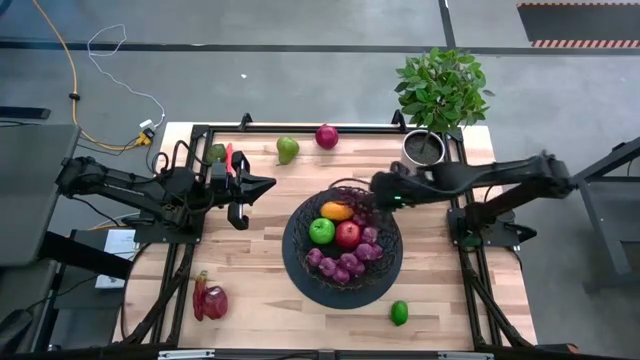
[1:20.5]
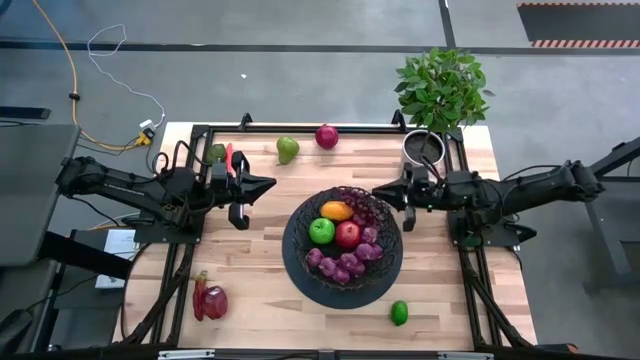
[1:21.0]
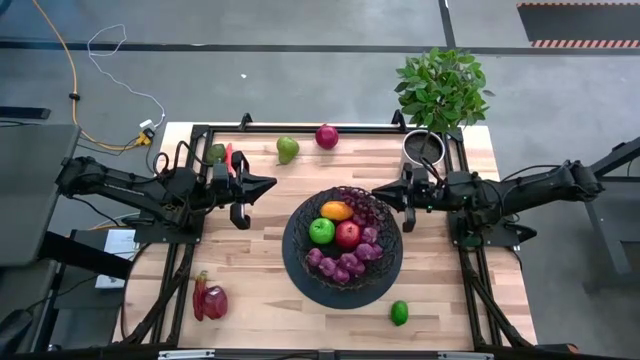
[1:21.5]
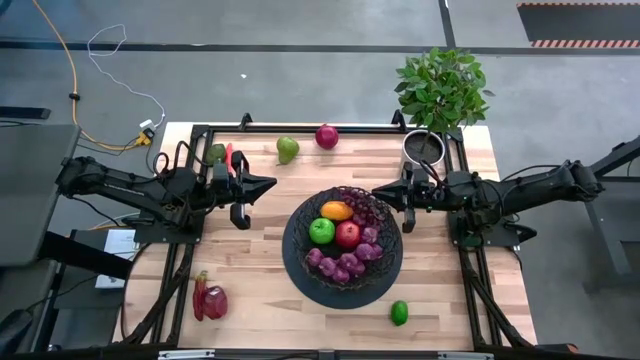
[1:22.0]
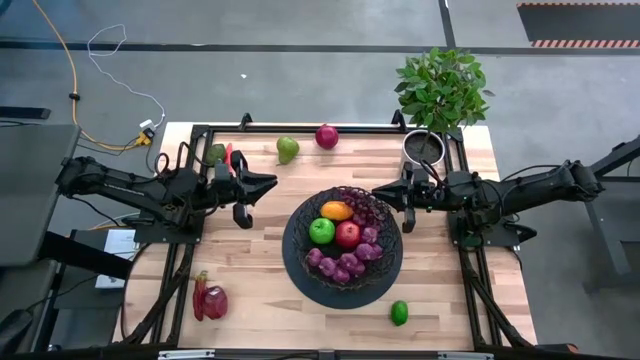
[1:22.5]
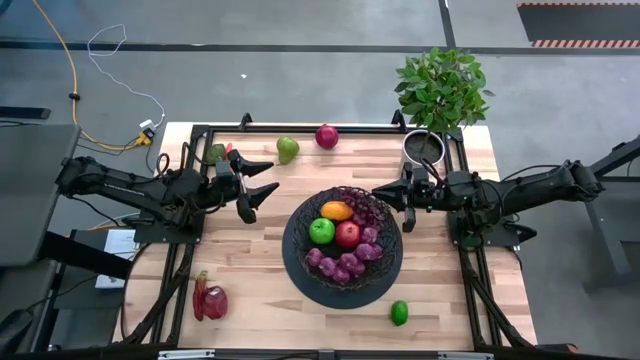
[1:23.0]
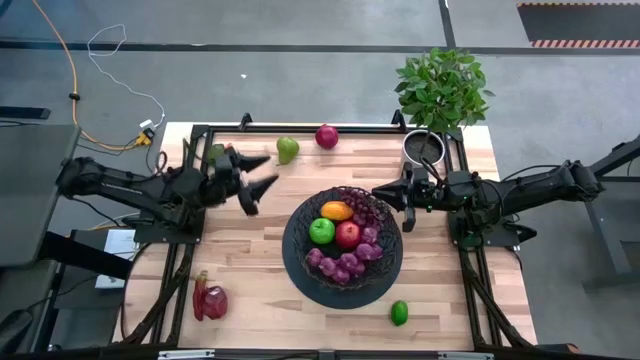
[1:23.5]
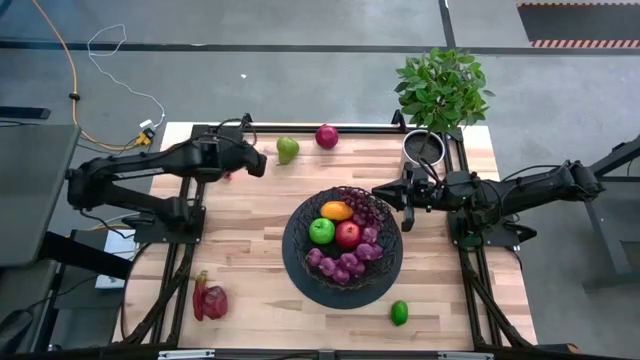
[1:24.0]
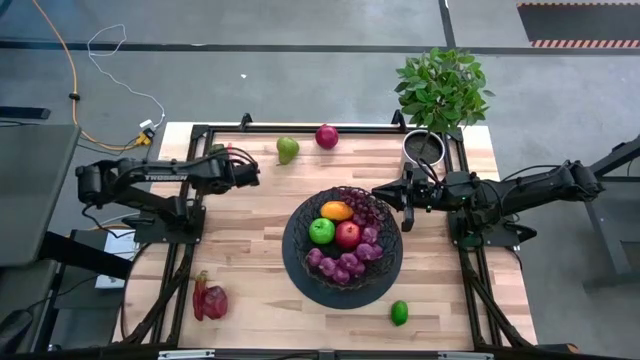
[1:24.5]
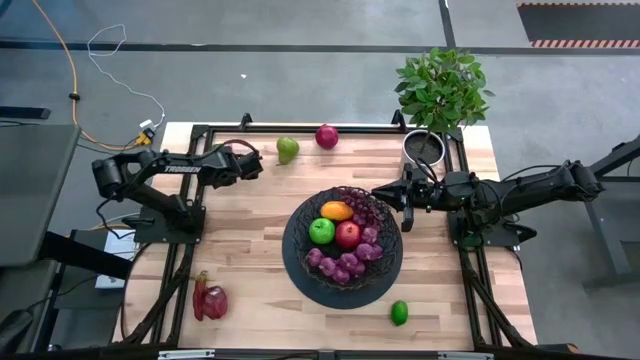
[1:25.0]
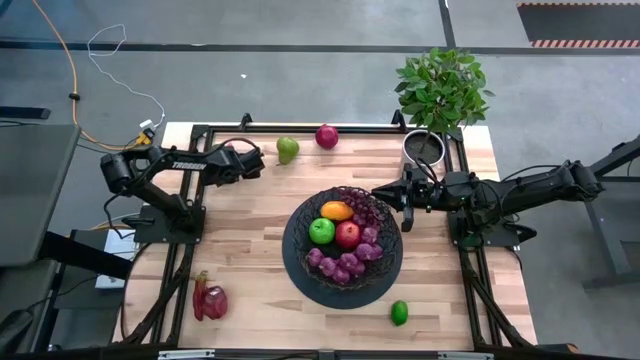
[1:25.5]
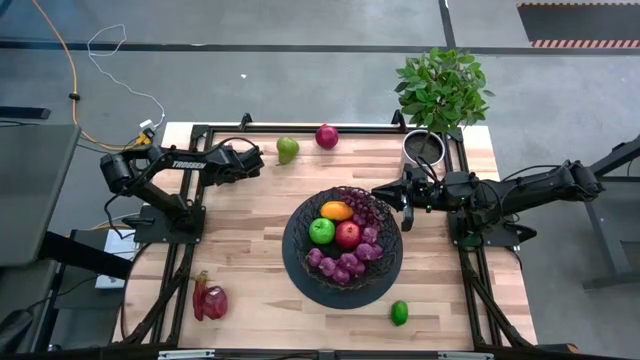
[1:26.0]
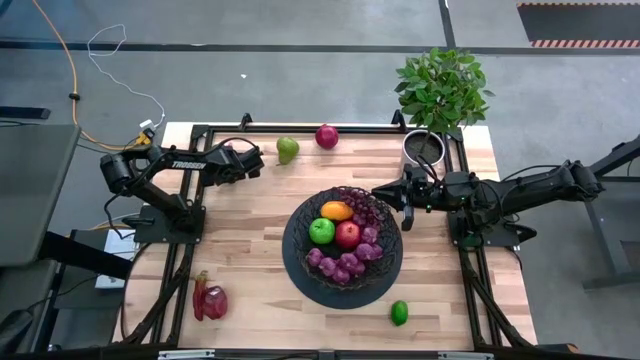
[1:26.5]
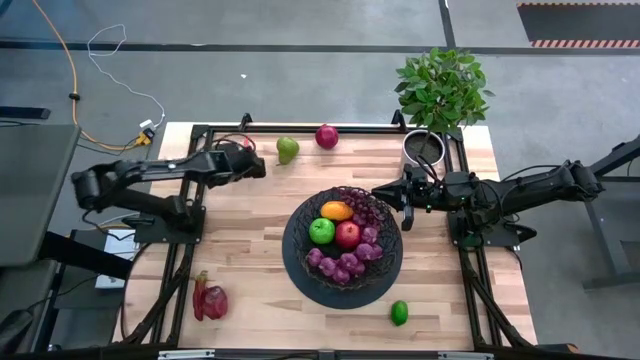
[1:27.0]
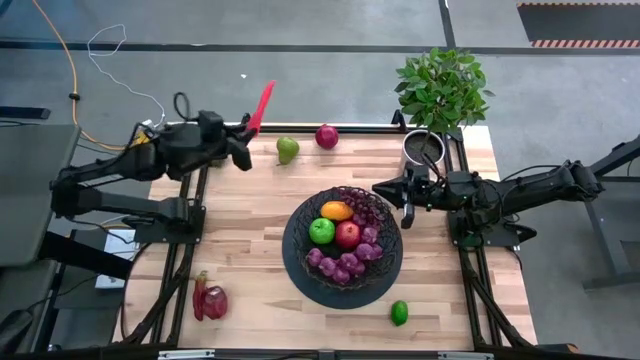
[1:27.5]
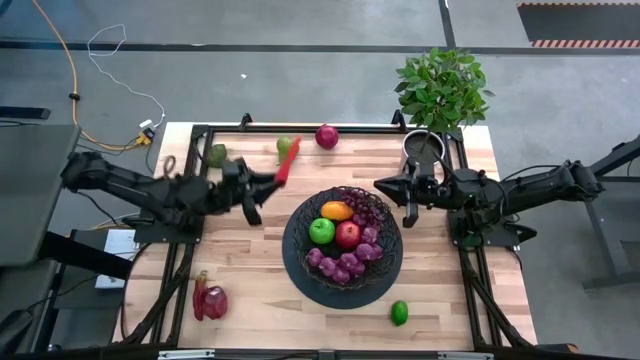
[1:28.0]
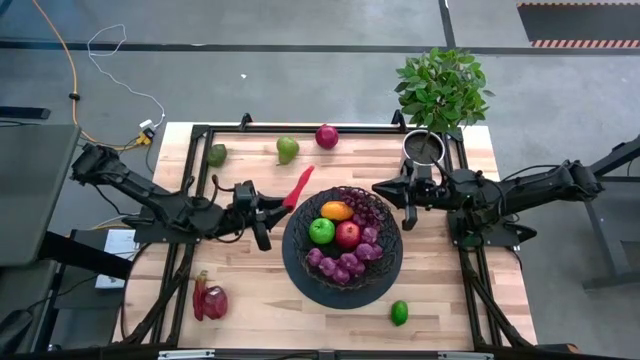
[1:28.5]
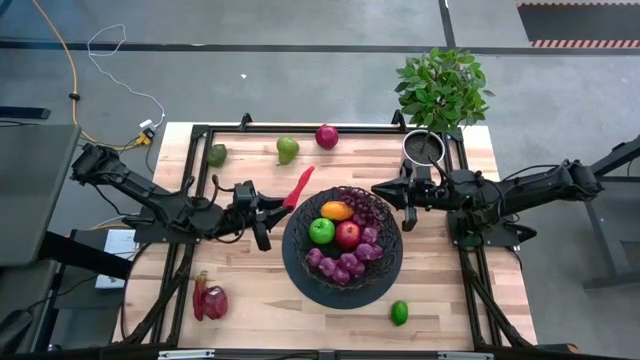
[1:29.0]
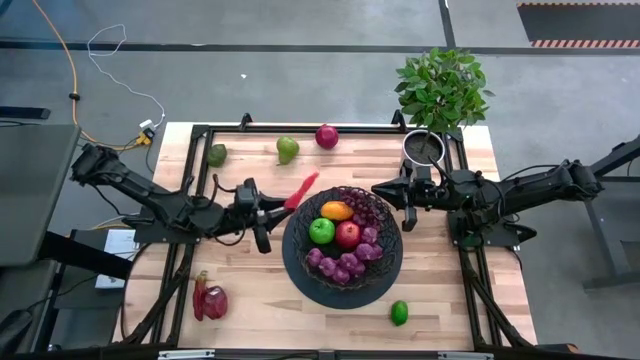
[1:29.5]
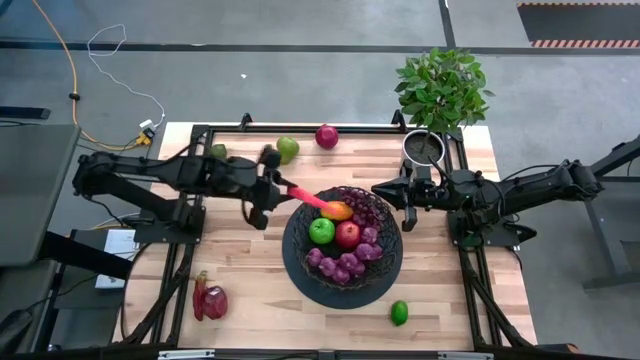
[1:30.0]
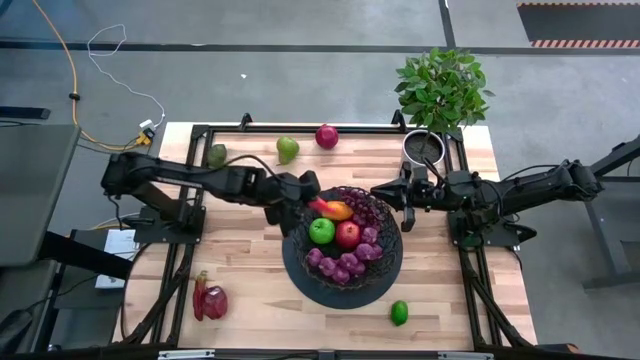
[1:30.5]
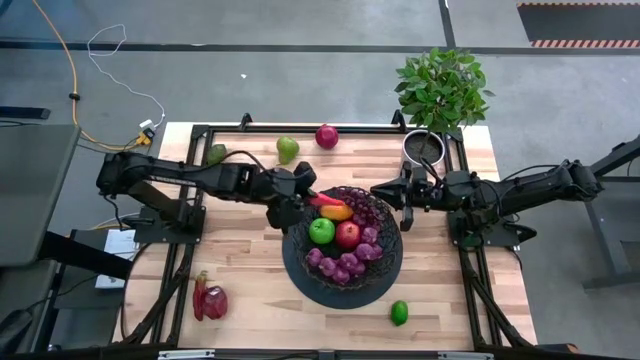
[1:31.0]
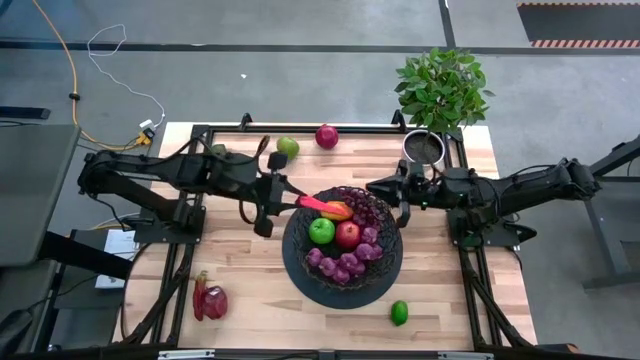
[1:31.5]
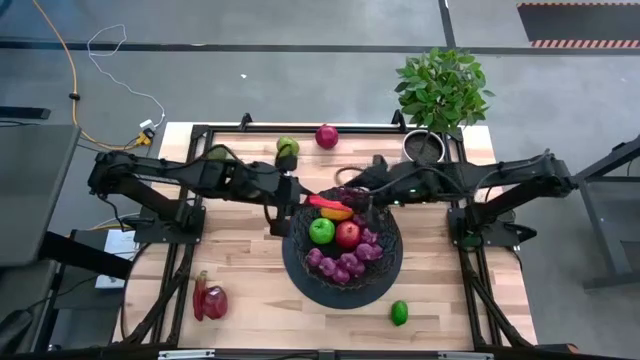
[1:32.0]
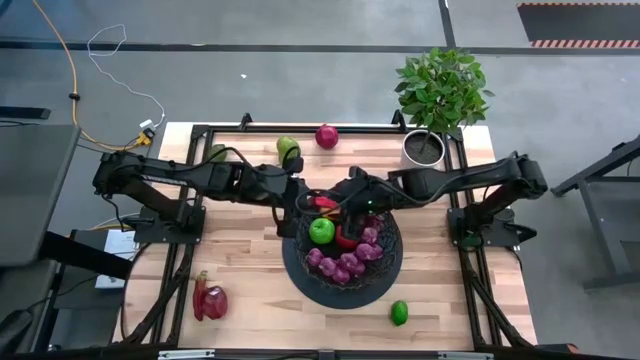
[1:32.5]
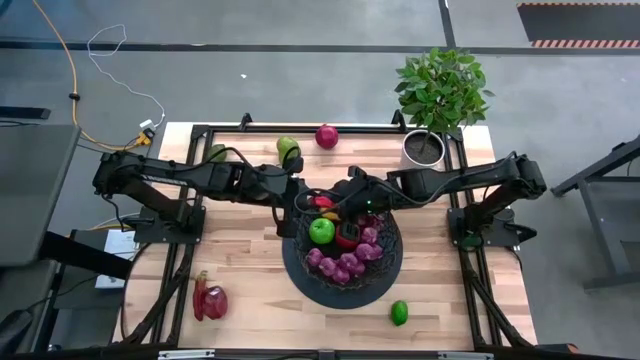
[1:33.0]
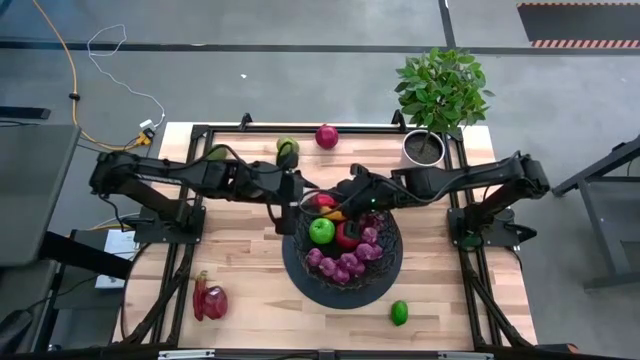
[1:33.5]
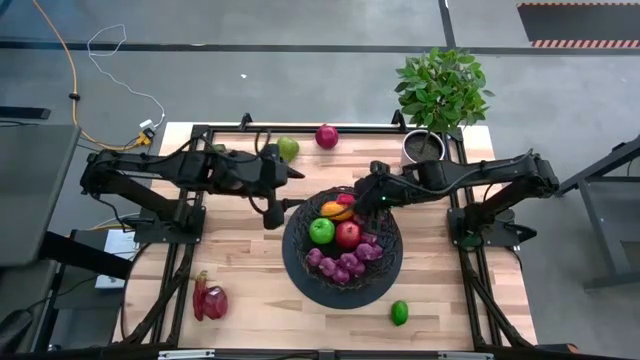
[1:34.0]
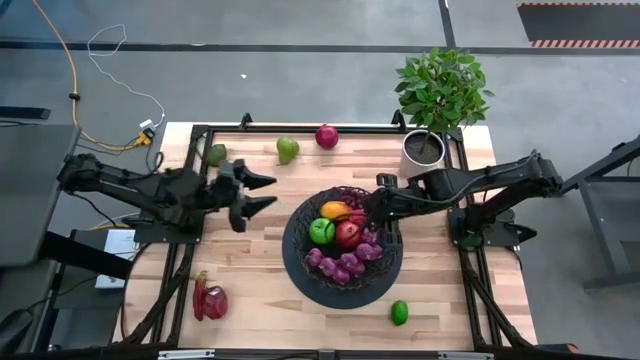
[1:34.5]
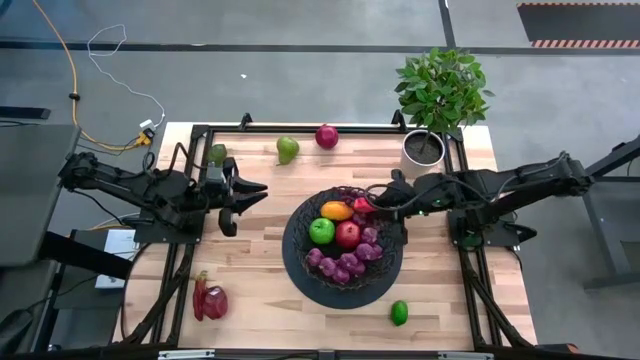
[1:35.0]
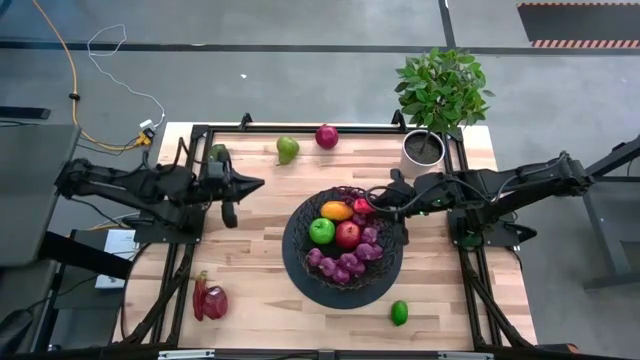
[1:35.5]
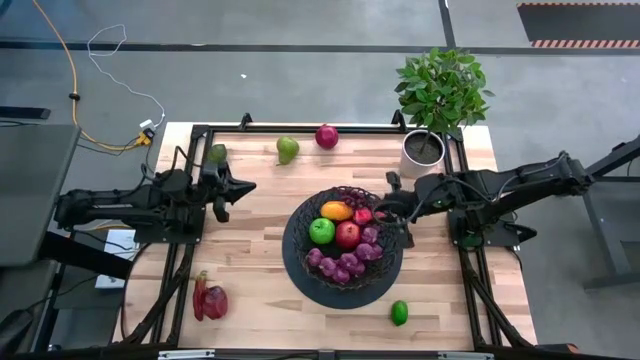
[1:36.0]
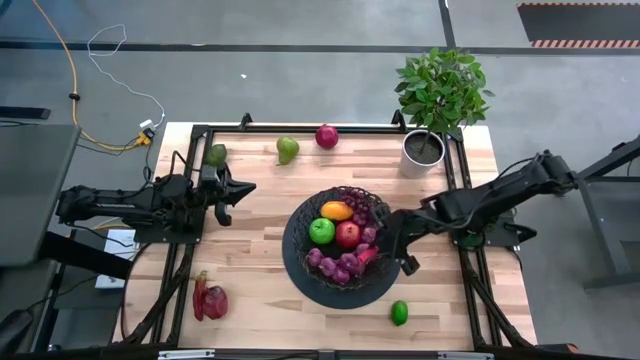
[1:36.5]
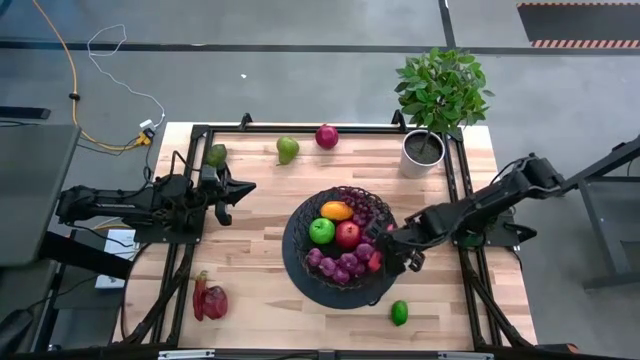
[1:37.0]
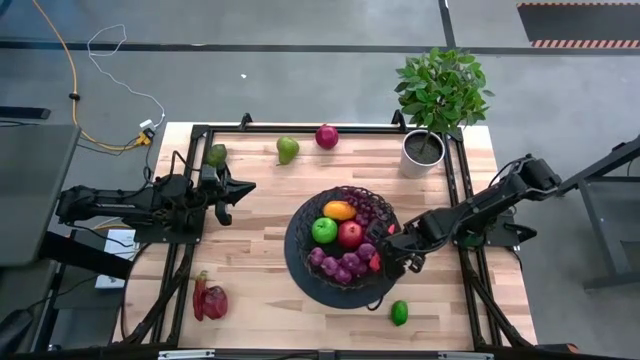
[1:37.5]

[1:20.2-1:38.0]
Task: Build produce basket
Put the orange carrot into the basket

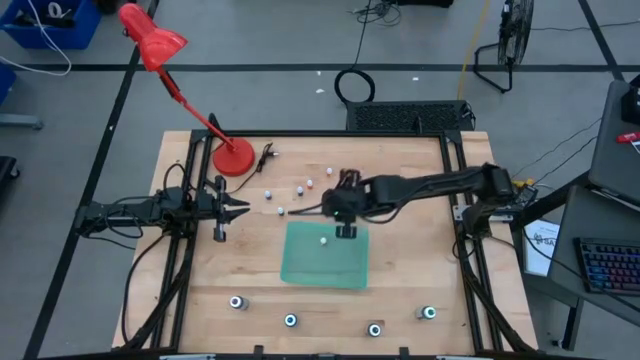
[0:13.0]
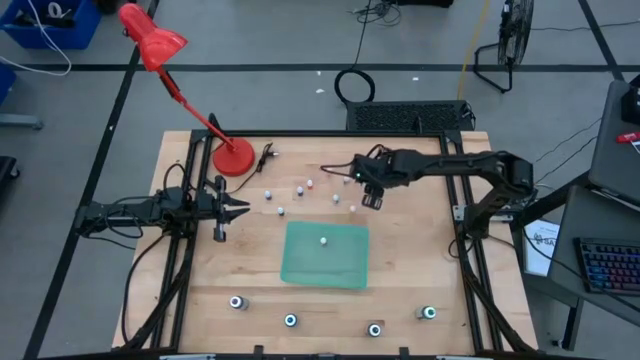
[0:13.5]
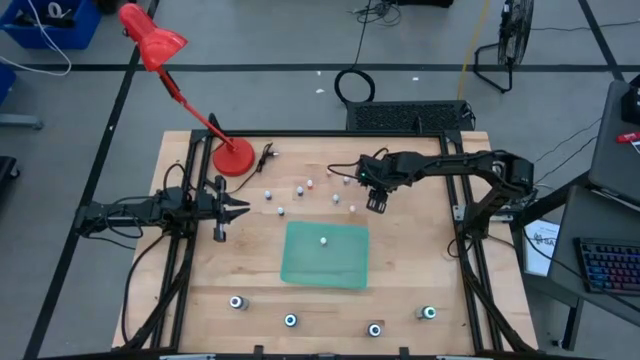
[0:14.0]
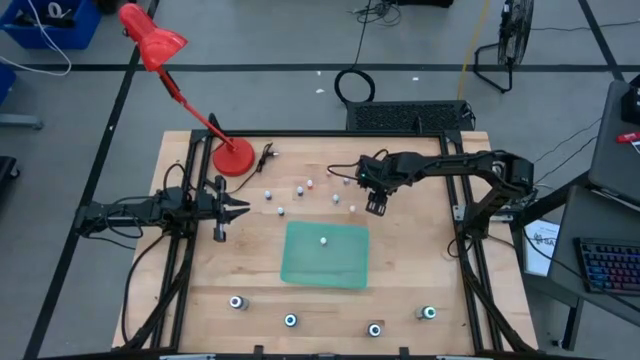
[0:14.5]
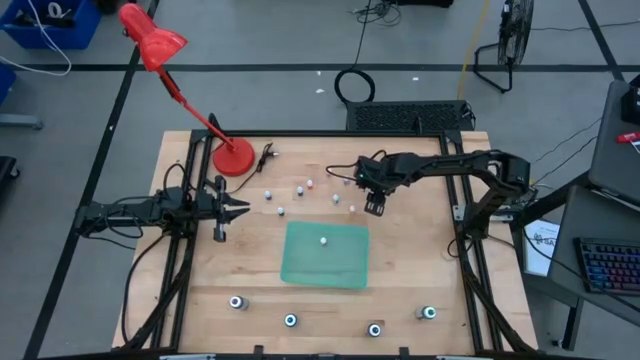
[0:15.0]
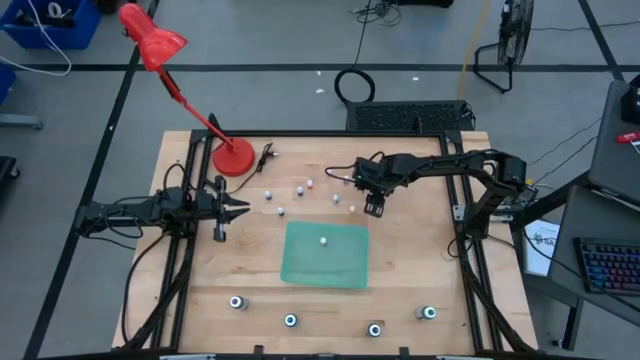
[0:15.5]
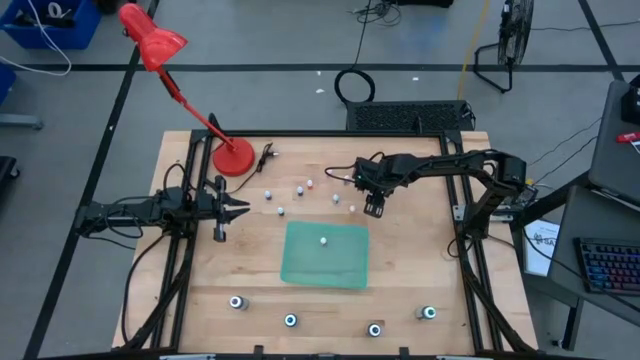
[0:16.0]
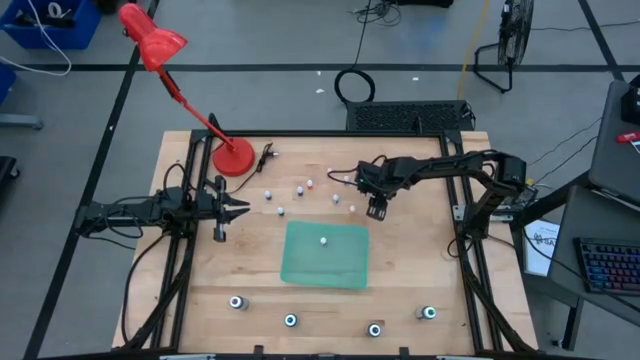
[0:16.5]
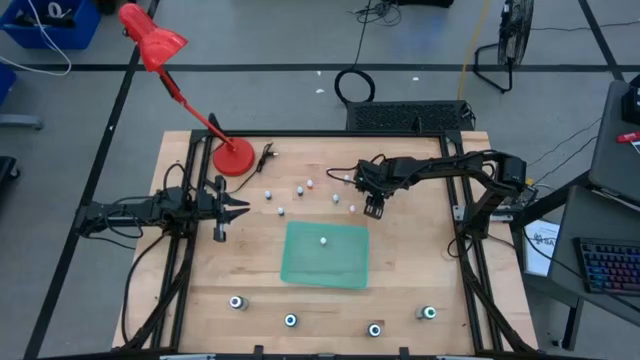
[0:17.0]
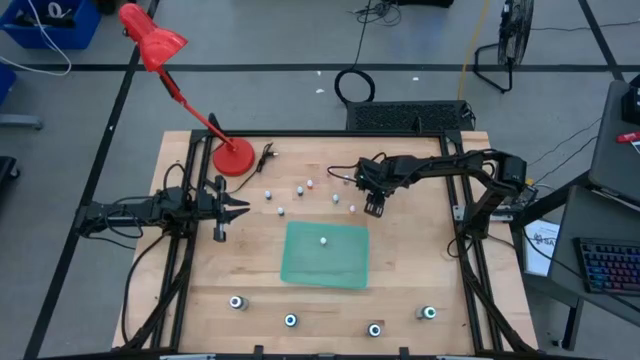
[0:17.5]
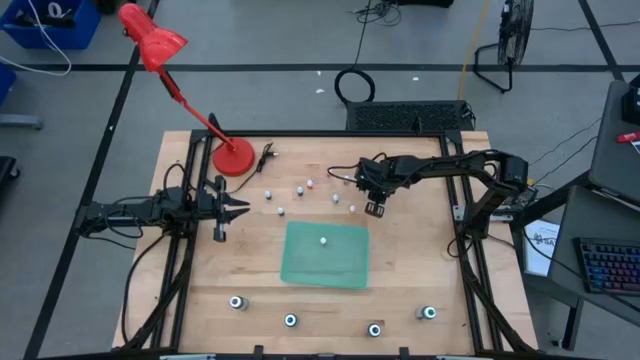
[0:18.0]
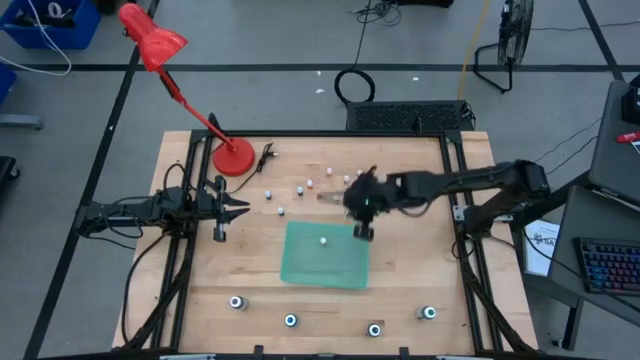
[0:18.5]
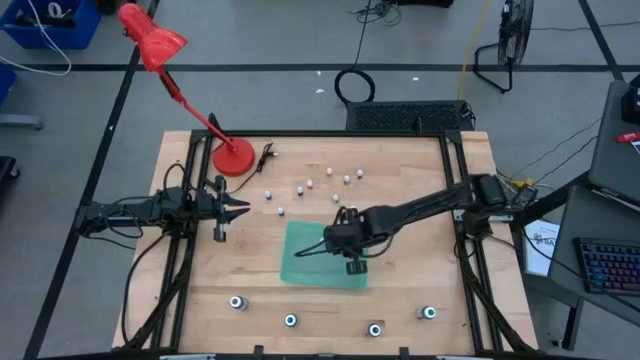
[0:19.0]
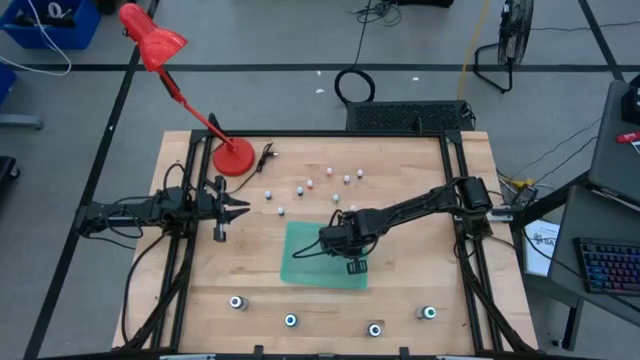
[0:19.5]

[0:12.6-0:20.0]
Task: Pick & Place food coloring
Put the small violet food coloring bottle into the green bin
